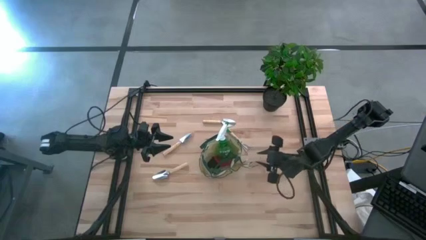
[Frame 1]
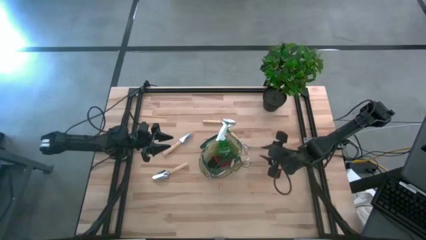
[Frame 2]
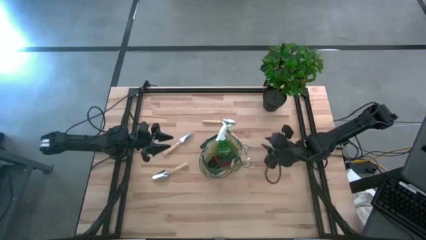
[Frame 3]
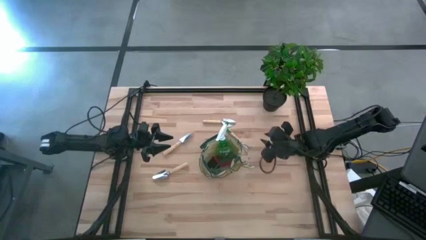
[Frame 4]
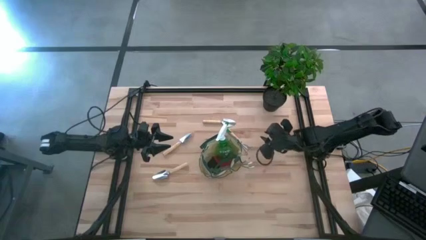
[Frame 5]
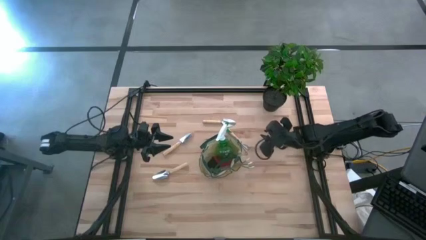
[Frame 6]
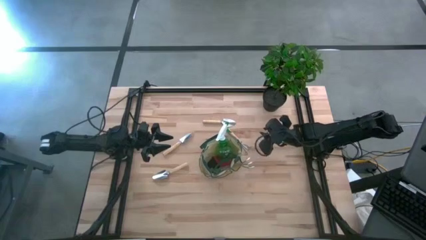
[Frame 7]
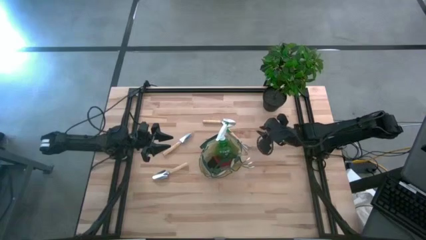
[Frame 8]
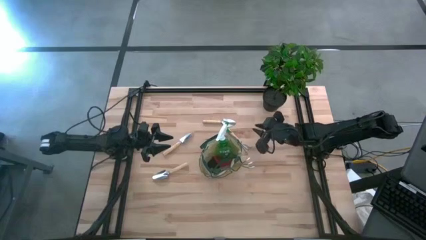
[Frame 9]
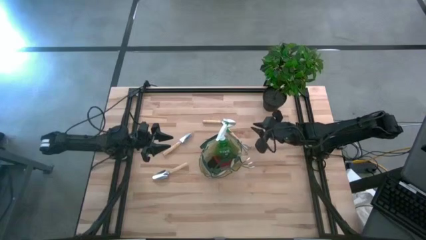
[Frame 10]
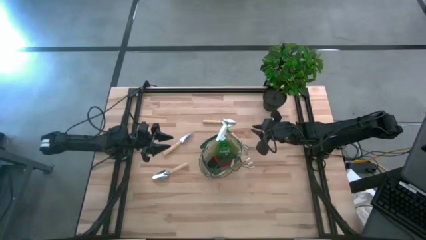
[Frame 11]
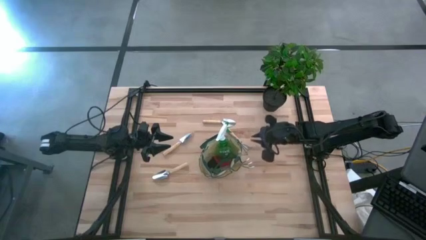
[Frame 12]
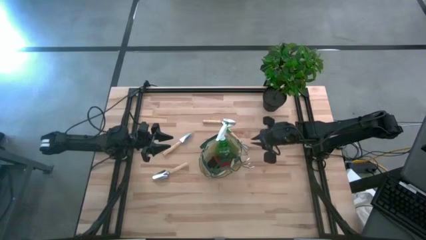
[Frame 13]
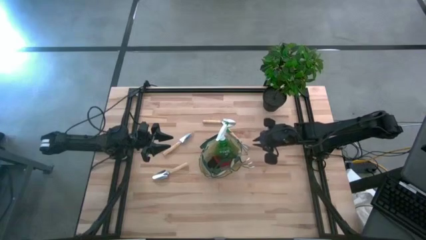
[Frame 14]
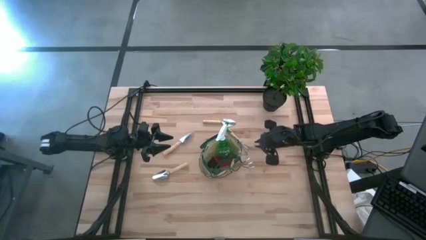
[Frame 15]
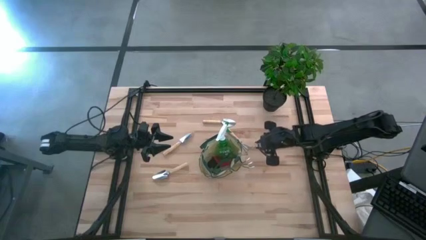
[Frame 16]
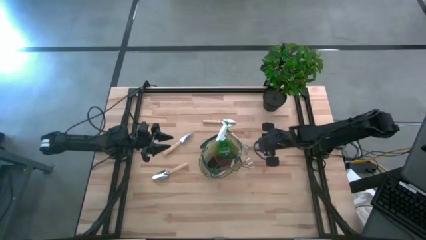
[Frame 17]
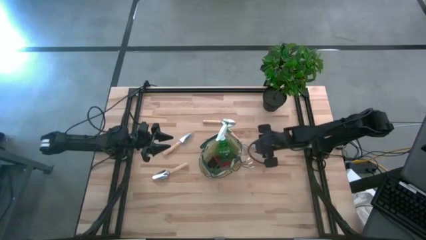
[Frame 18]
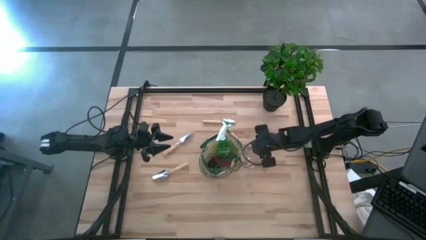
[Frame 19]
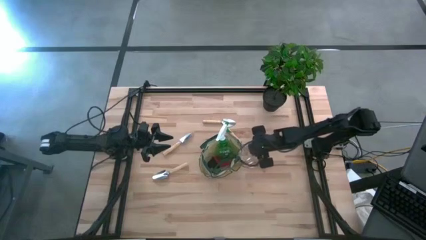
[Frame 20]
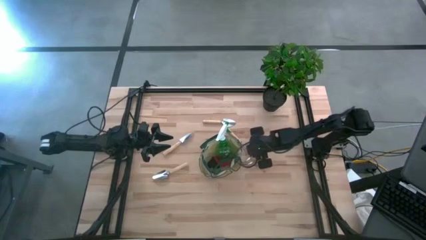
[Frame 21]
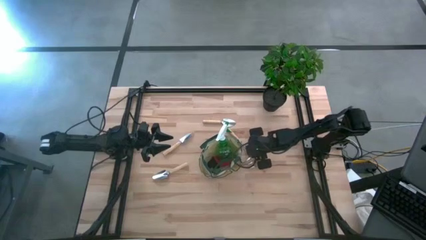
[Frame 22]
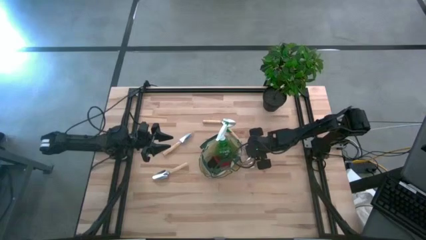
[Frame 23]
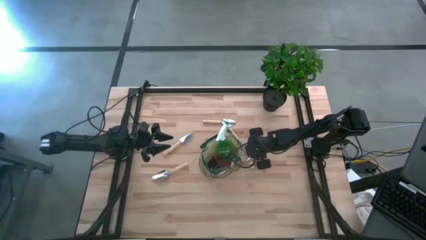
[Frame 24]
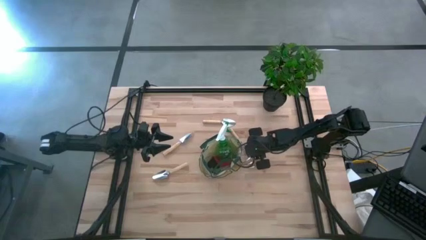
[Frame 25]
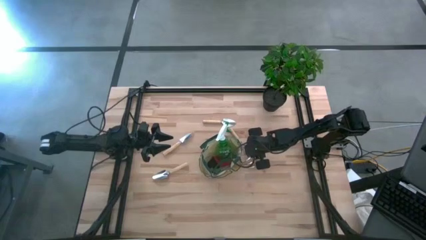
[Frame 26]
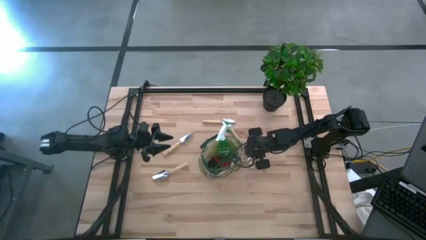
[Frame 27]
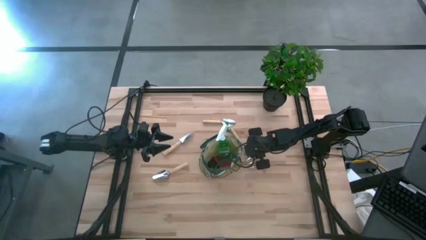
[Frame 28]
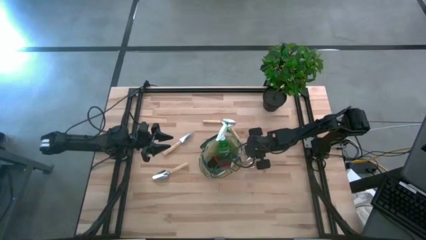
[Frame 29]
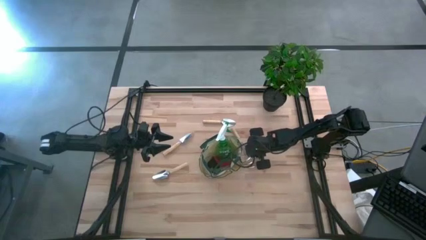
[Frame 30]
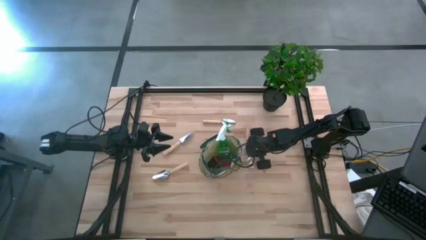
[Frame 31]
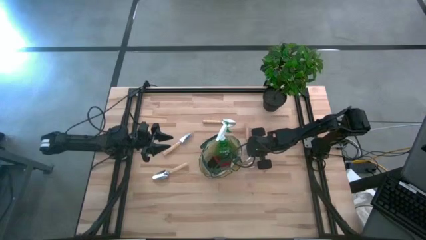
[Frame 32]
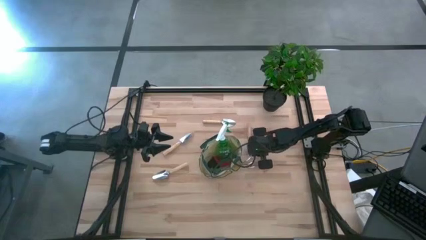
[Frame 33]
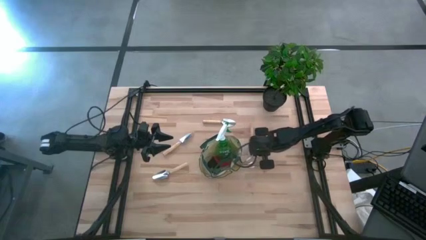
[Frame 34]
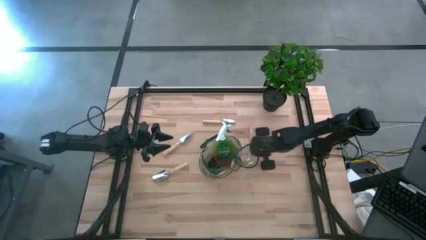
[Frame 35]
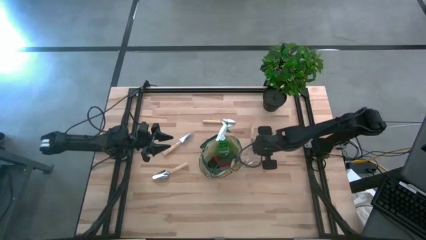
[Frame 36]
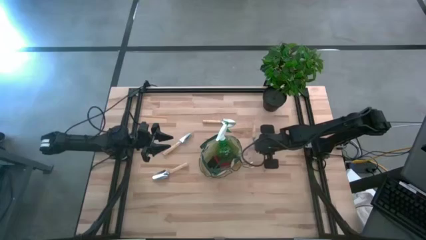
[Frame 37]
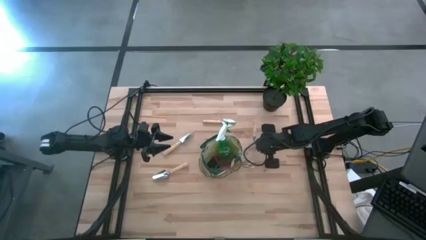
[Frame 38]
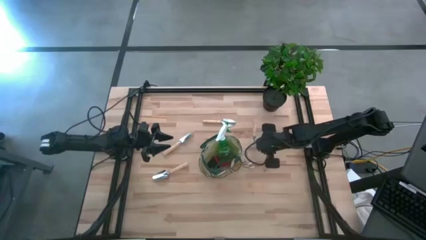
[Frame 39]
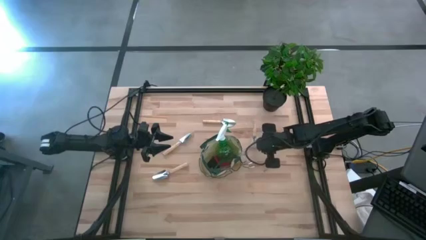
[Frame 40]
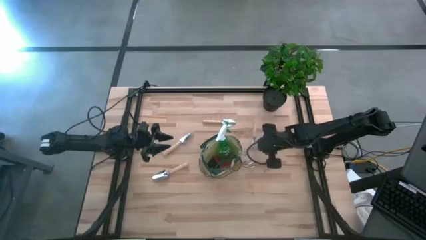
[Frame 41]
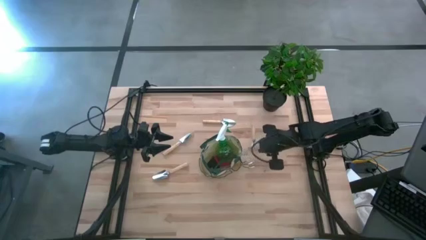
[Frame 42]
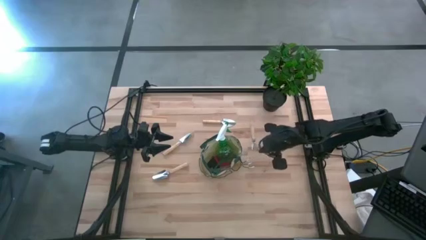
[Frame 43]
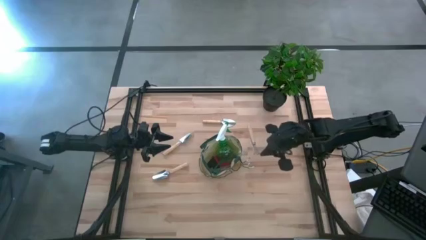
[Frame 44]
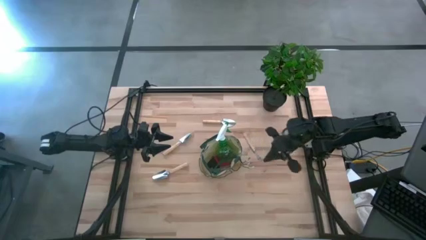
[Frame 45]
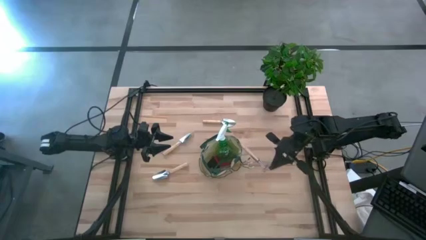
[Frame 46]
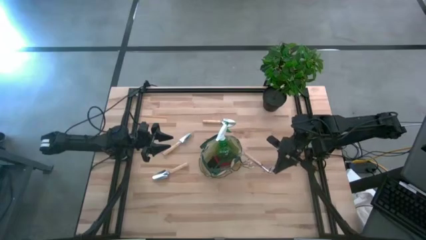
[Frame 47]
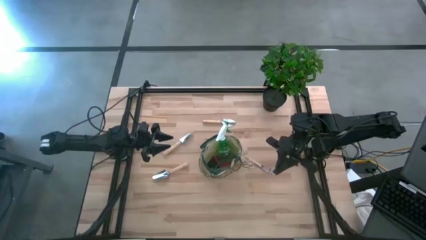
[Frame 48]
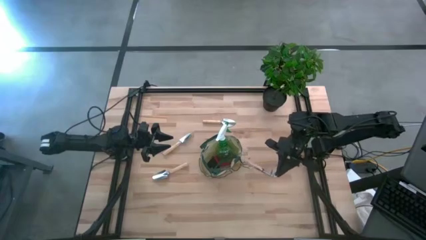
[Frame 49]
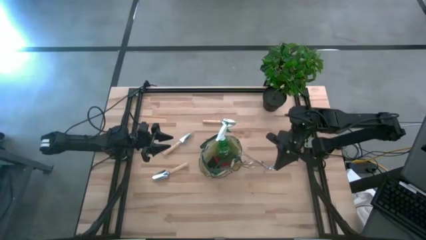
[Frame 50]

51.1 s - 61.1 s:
Task: Pick & Place Garden tools in Gardening bag
Put the brown hand rake into the green gardening bag
